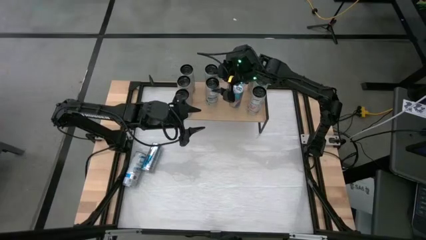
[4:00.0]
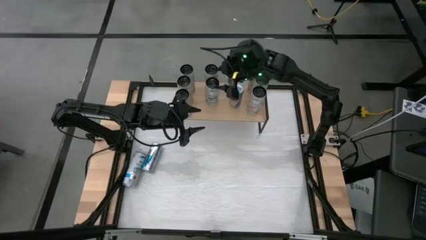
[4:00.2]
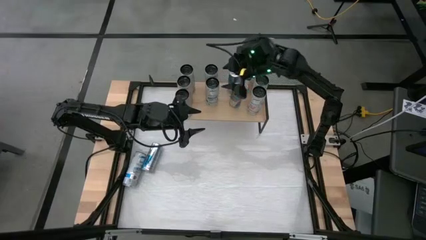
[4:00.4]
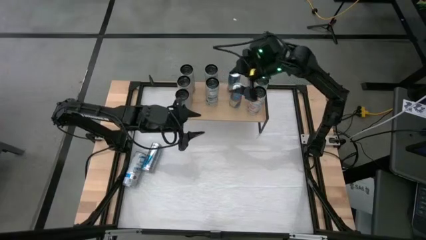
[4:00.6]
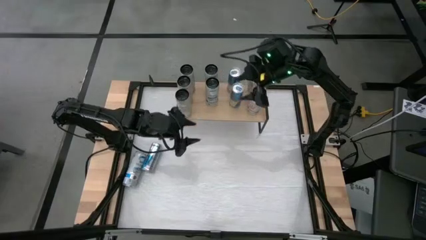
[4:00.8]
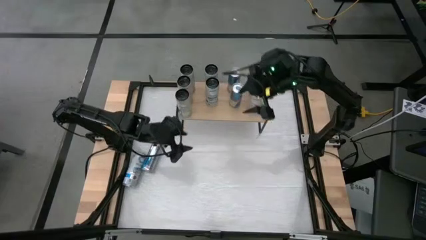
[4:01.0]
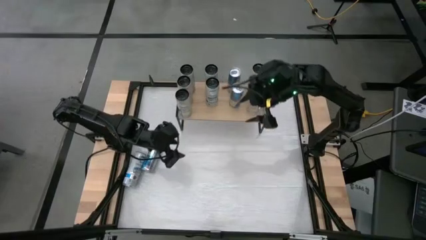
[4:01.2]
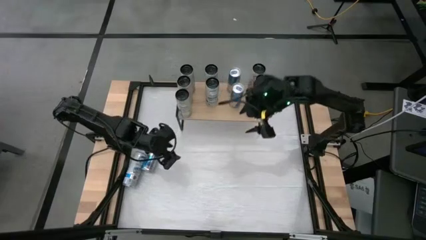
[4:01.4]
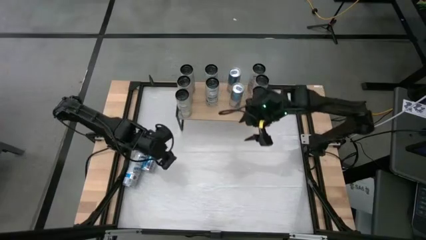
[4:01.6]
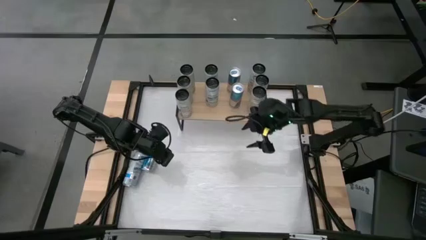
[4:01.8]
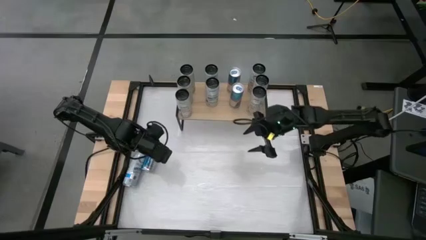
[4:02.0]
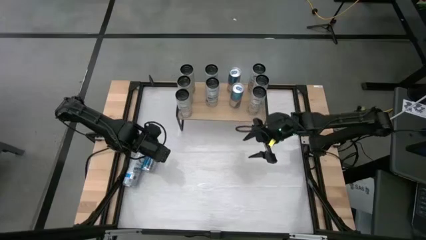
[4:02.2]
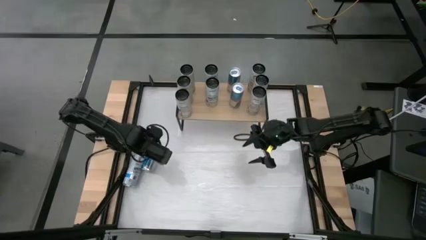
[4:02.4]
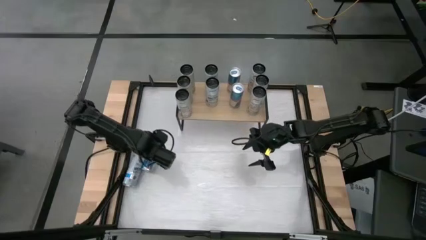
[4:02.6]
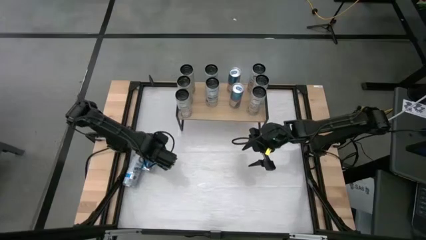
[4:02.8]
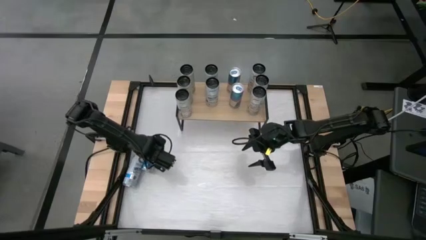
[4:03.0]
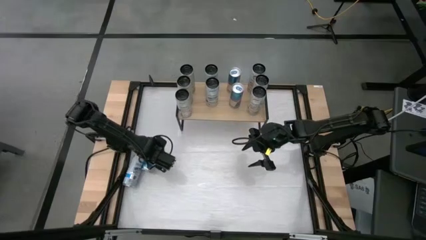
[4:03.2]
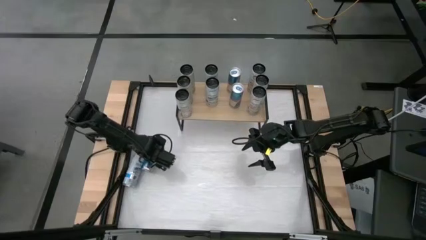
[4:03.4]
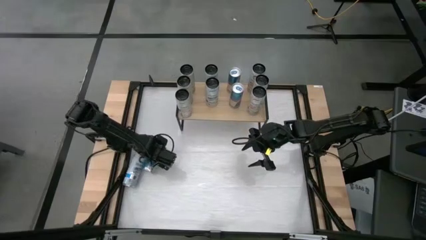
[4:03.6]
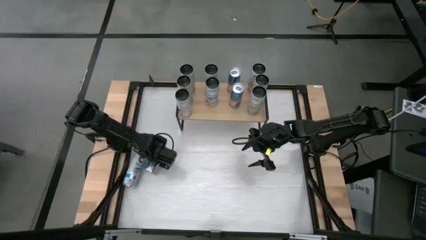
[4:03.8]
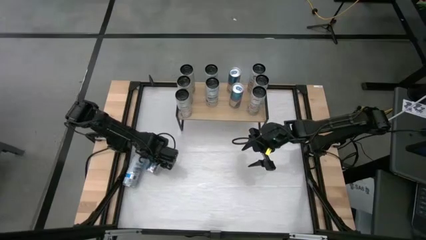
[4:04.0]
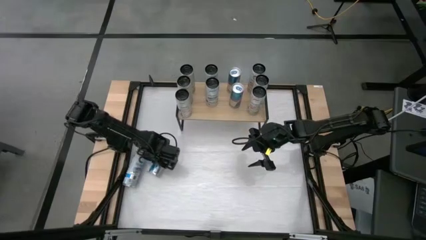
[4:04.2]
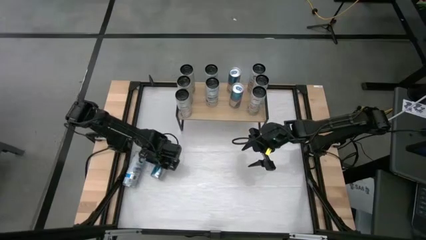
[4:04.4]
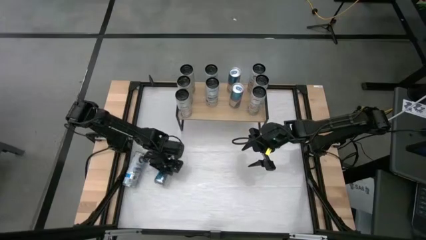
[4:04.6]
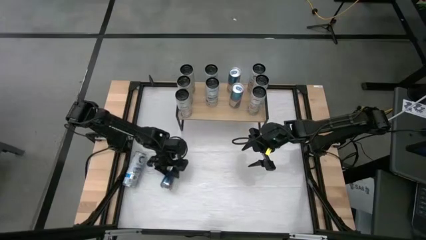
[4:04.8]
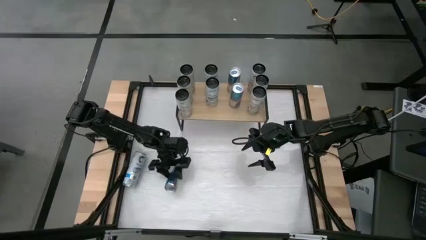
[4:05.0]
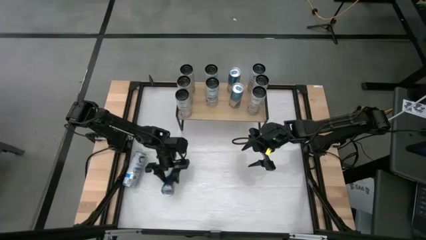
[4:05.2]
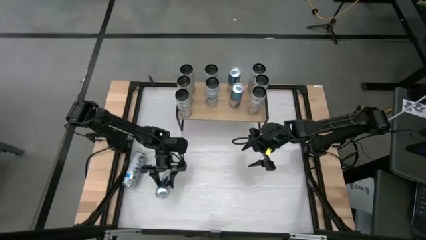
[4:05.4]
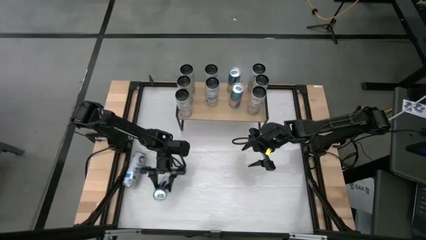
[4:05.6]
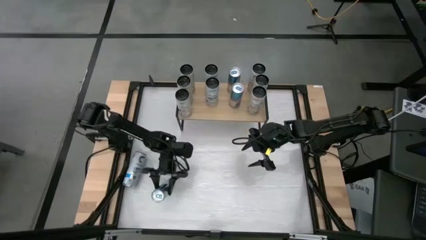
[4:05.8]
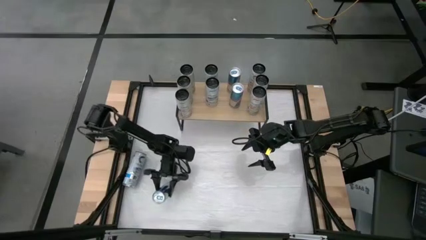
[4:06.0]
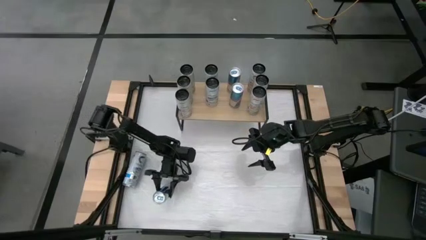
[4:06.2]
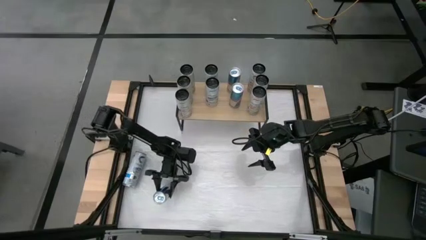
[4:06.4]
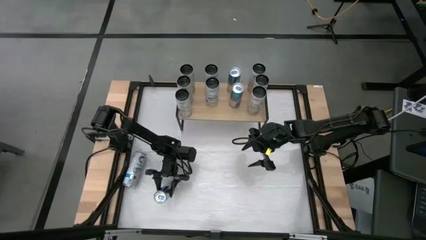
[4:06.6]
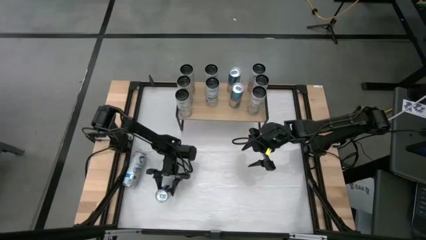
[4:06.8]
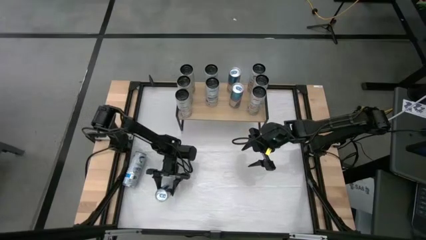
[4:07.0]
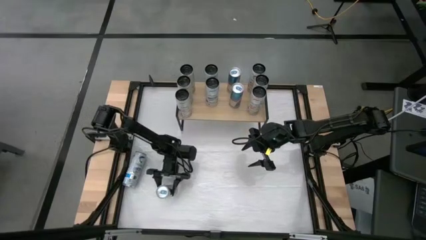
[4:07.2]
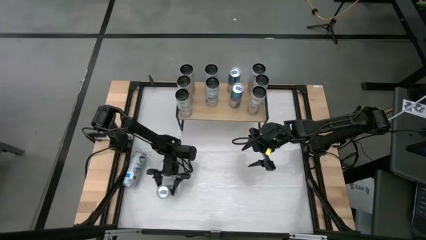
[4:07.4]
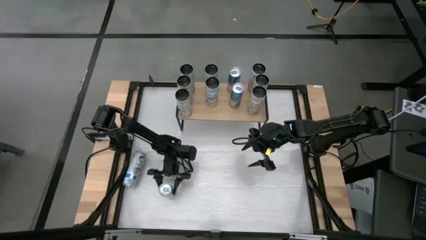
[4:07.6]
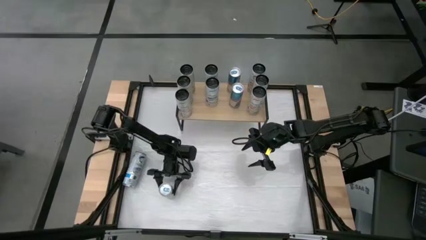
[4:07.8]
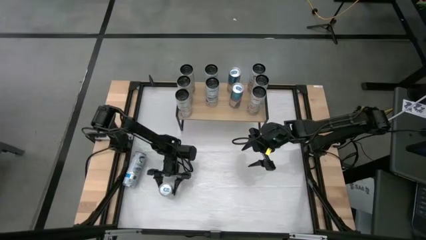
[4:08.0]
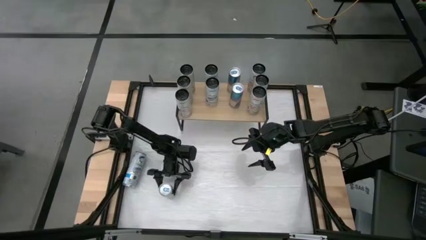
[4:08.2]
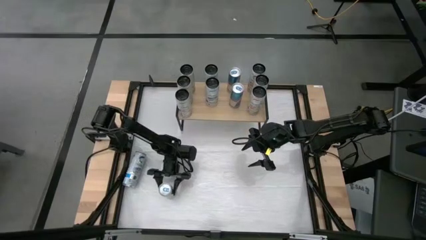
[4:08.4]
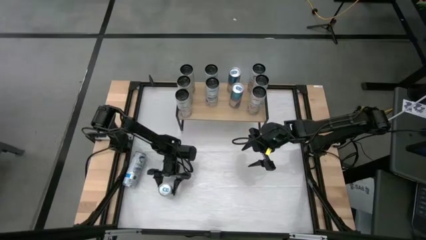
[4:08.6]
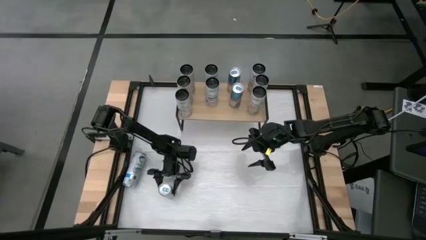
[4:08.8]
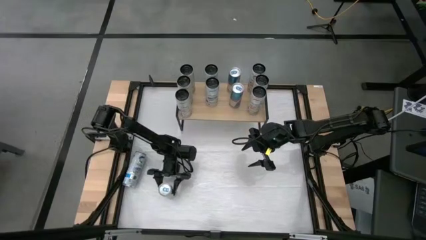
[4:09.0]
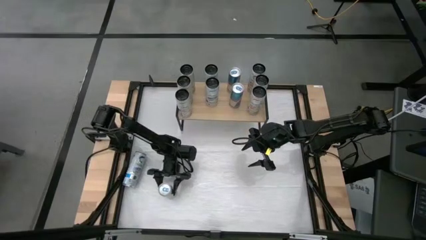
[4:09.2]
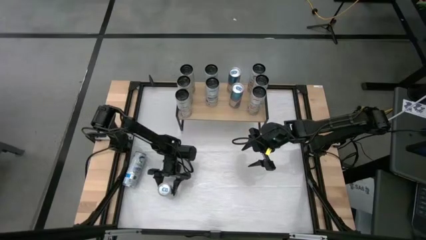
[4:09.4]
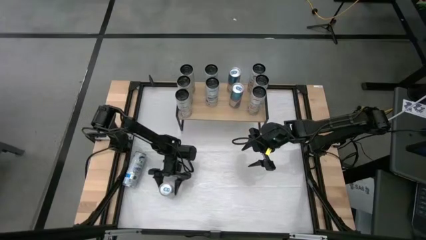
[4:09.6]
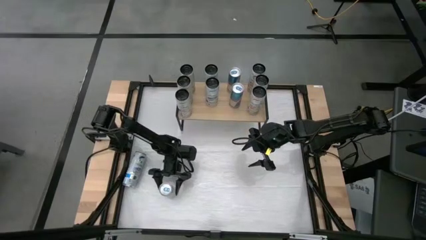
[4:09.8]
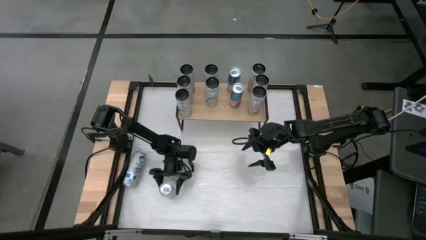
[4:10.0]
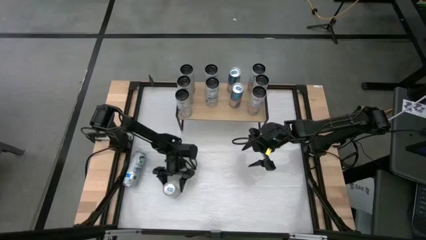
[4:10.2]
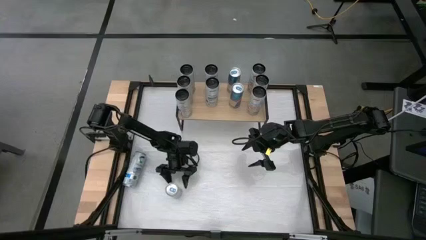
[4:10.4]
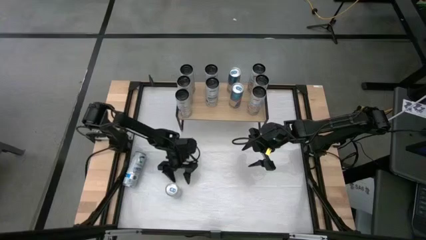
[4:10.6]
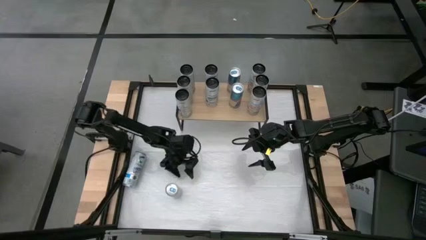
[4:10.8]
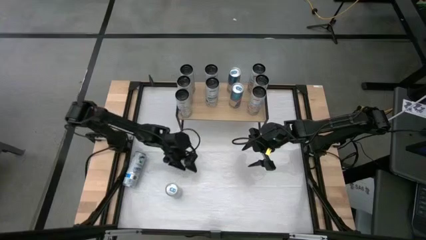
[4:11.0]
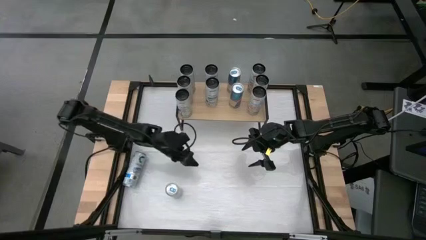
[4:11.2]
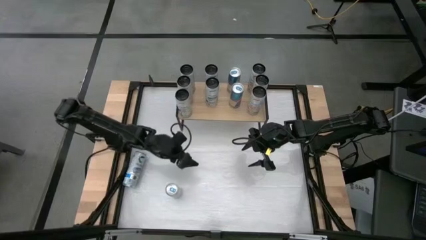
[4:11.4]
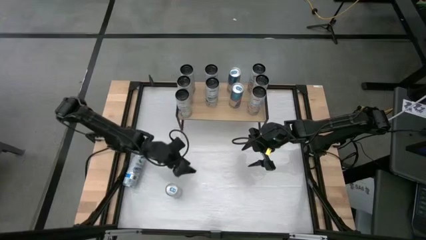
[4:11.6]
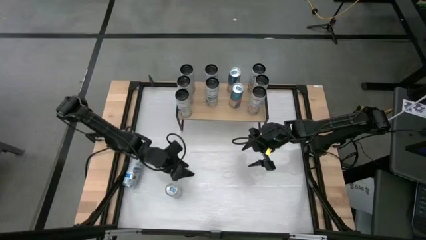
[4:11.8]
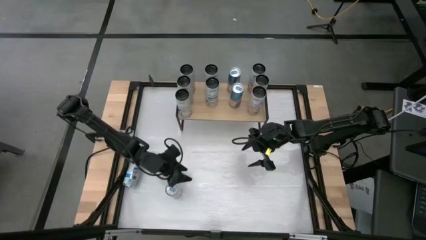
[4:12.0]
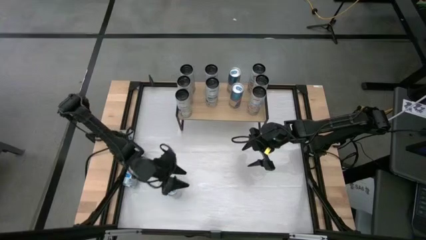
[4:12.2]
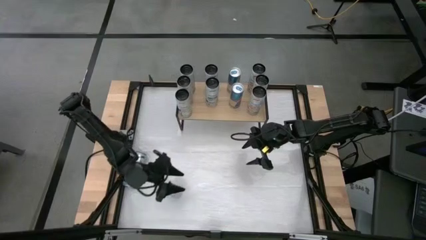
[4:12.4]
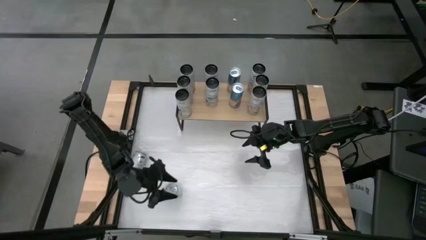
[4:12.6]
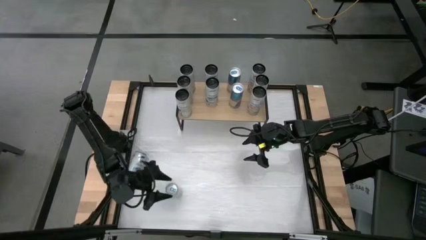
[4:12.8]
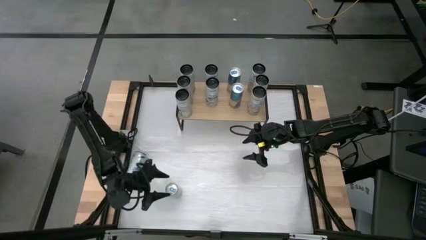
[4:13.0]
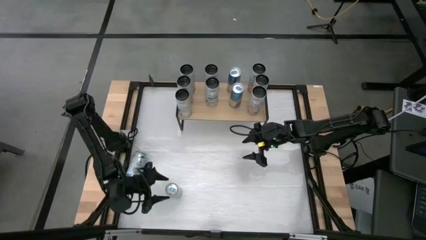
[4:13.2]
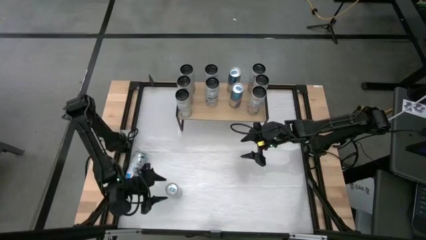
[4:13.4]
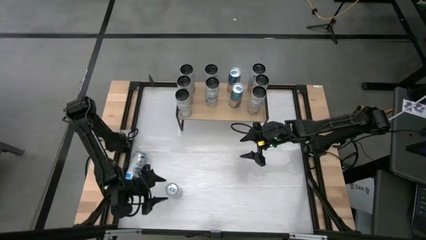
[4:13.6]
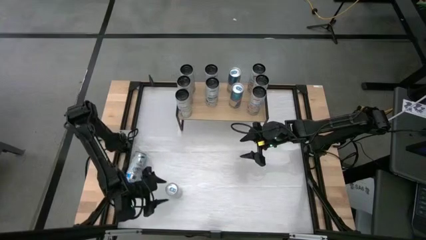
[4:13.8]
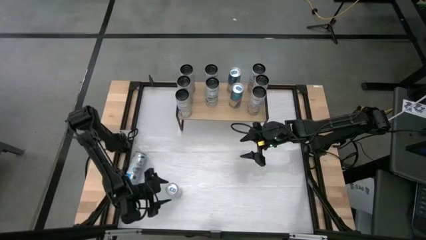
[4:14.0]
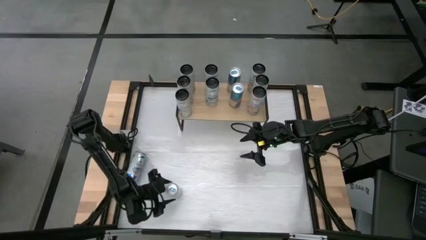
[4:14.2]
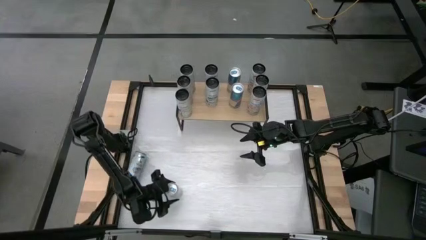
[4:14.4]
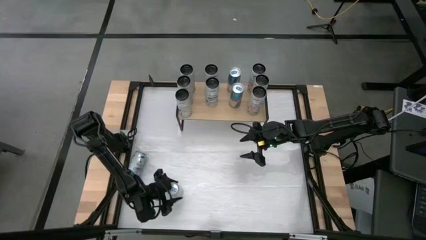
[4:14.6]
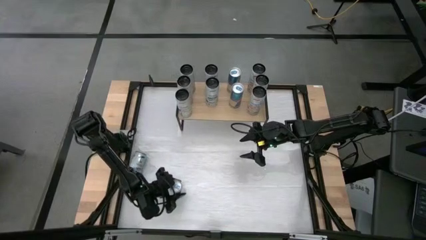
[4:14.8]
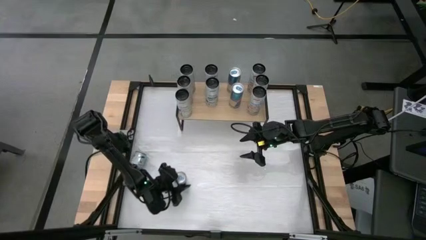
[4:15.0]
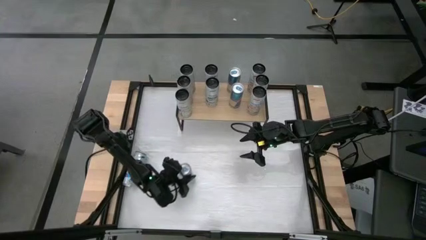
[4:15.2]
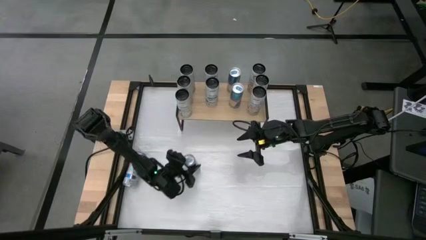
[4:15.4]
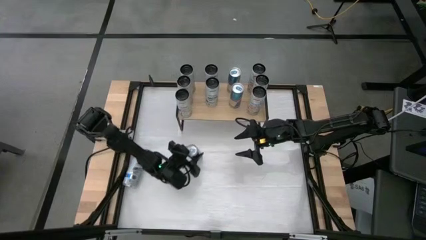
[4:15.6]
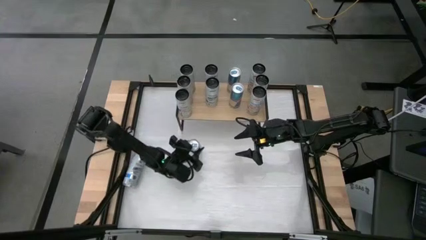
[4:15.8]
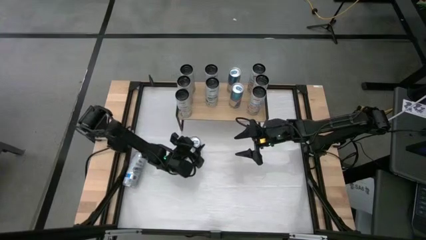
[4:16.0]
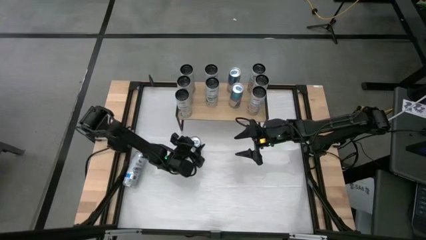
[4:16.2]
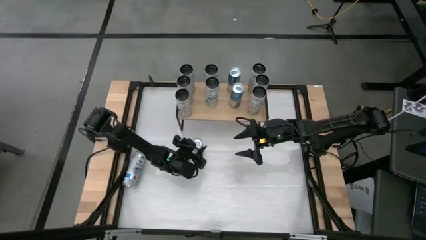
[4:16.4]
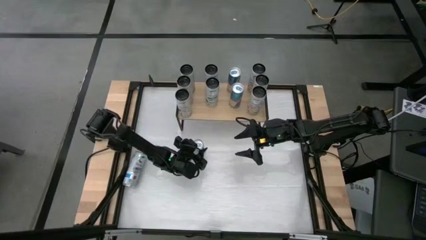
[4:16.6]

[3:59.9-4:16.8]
Task: Sort soda cans
Put the blue soda can on the shelf and align with other blue soda cans
